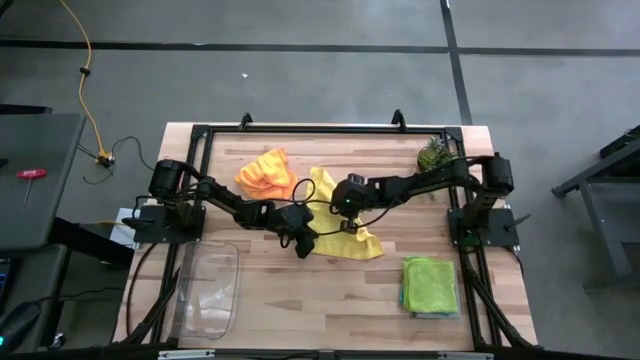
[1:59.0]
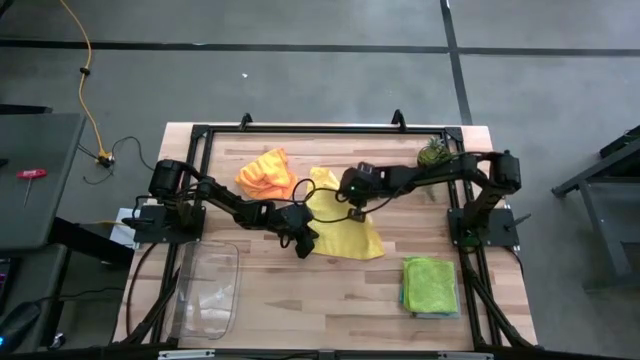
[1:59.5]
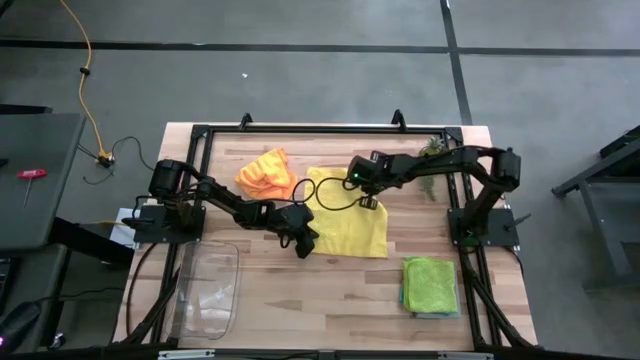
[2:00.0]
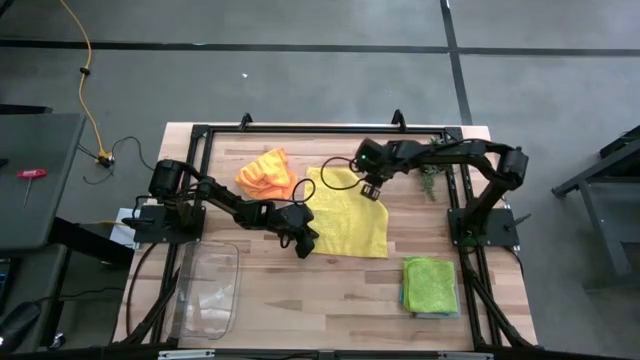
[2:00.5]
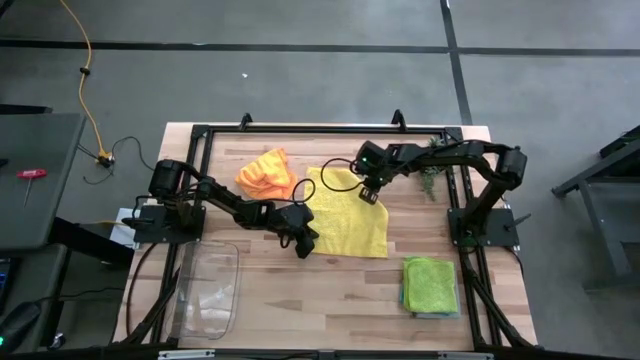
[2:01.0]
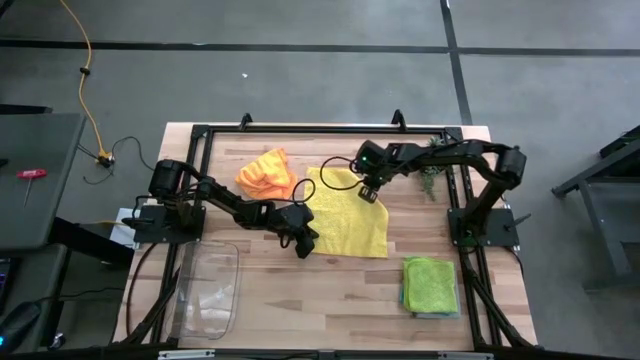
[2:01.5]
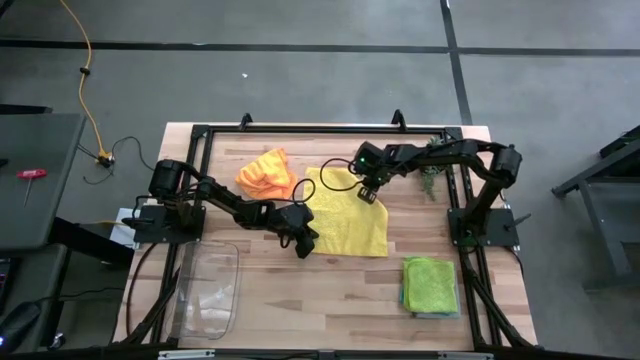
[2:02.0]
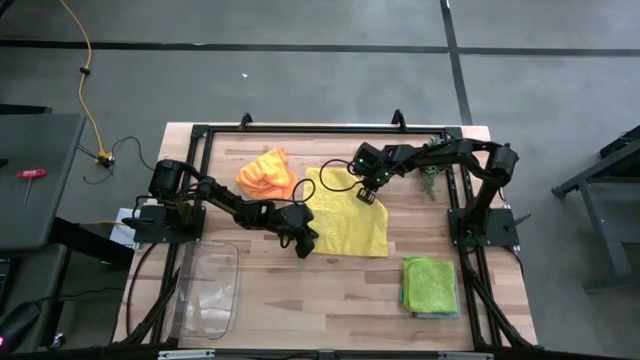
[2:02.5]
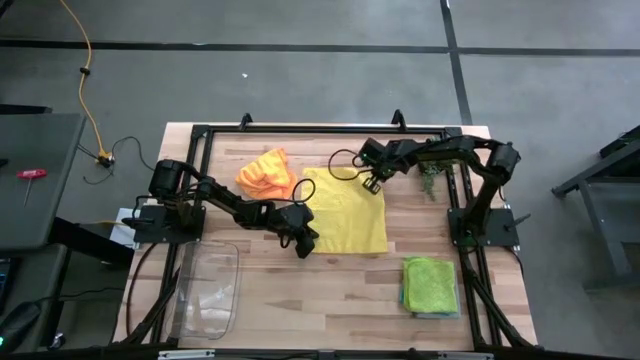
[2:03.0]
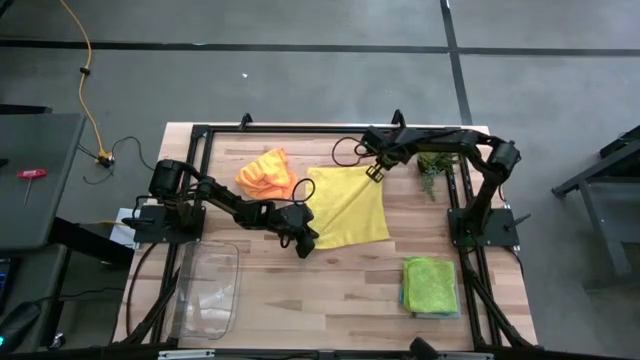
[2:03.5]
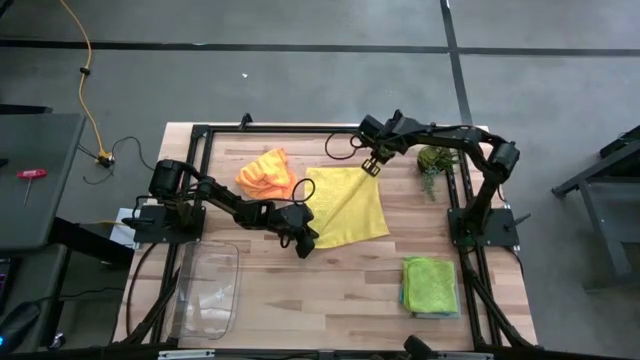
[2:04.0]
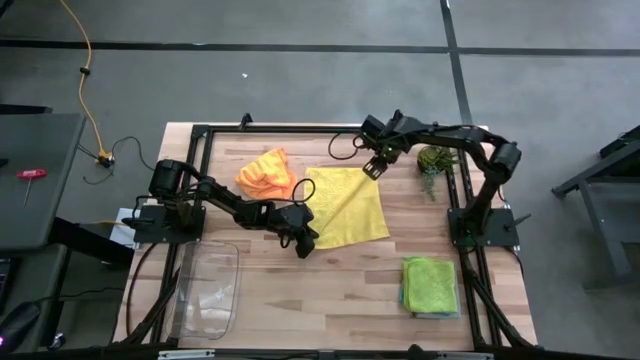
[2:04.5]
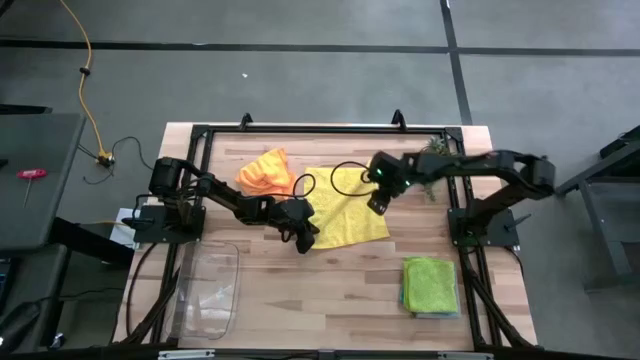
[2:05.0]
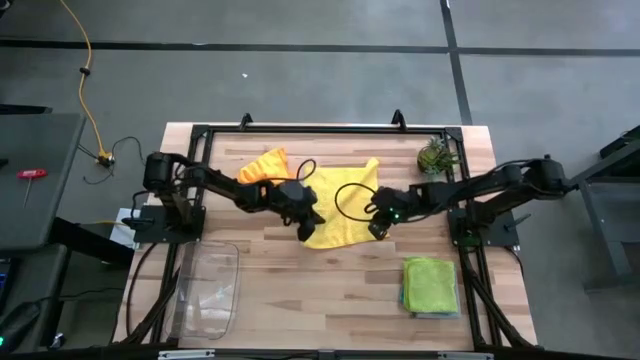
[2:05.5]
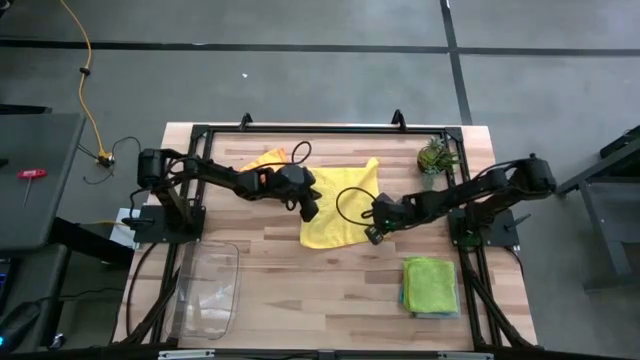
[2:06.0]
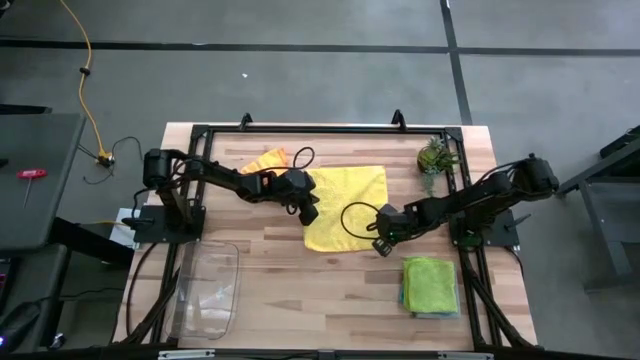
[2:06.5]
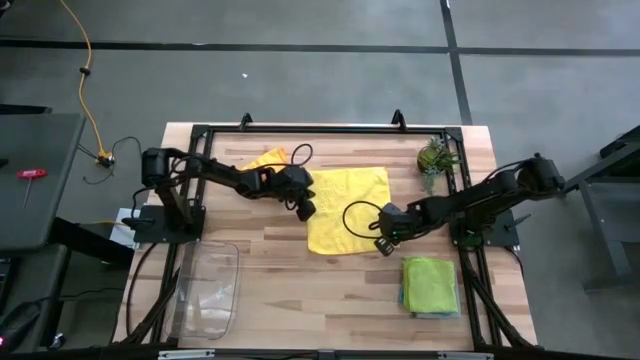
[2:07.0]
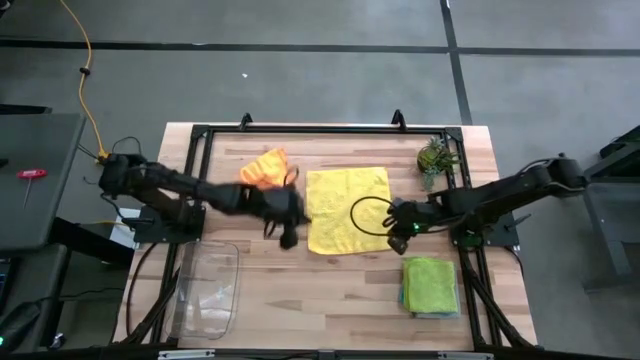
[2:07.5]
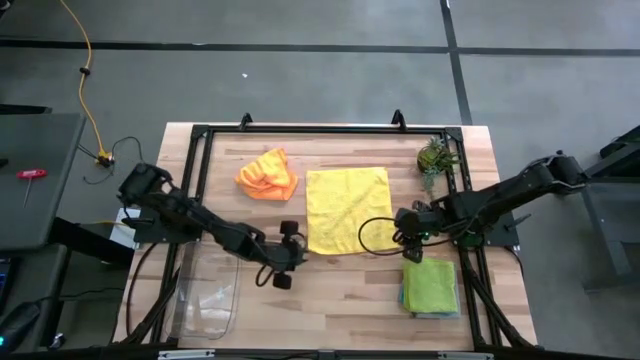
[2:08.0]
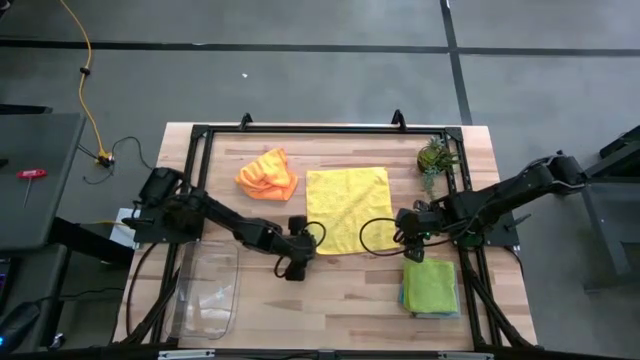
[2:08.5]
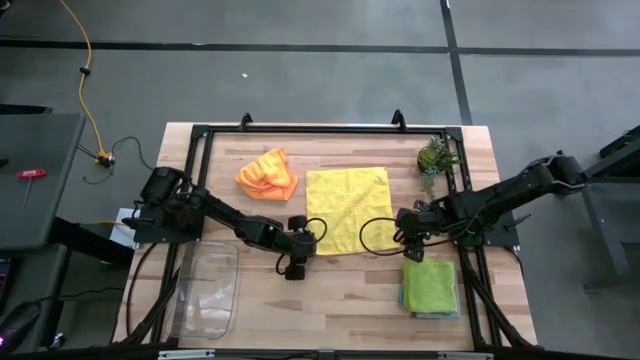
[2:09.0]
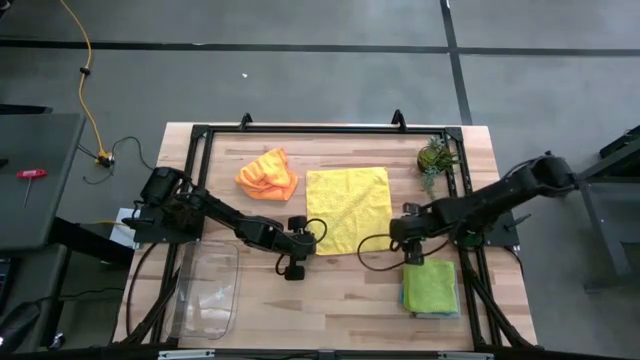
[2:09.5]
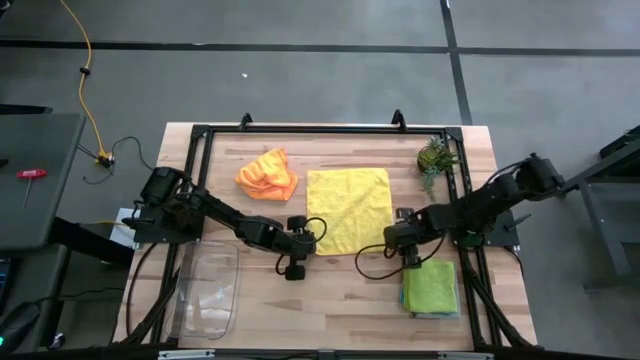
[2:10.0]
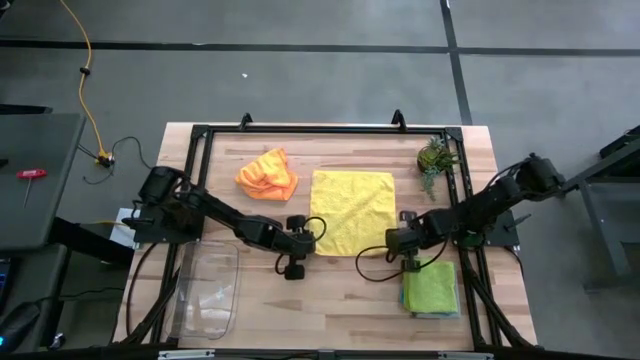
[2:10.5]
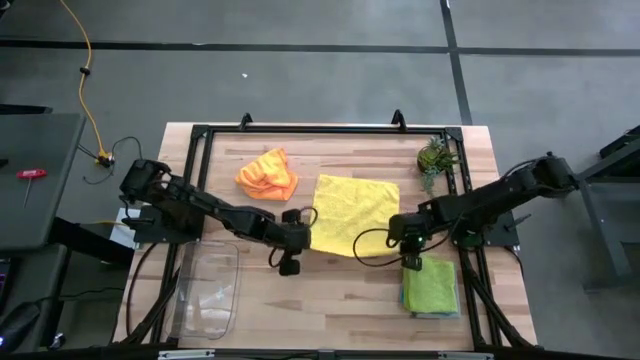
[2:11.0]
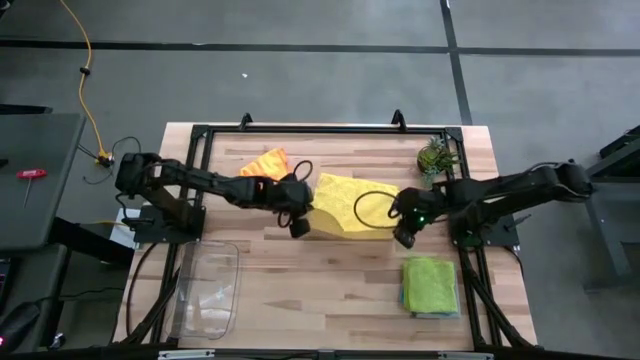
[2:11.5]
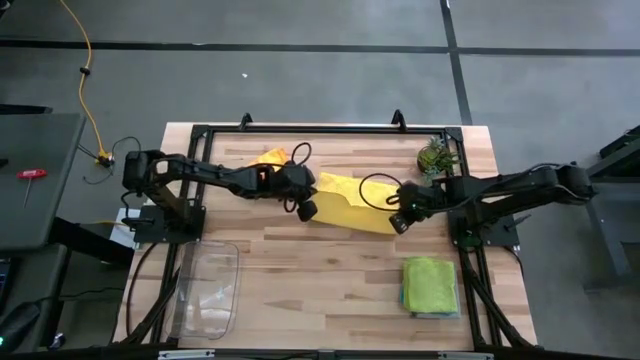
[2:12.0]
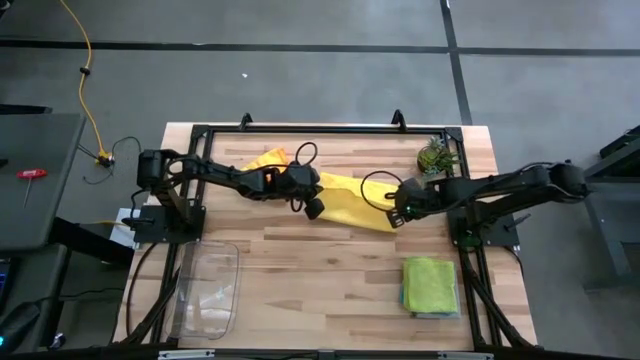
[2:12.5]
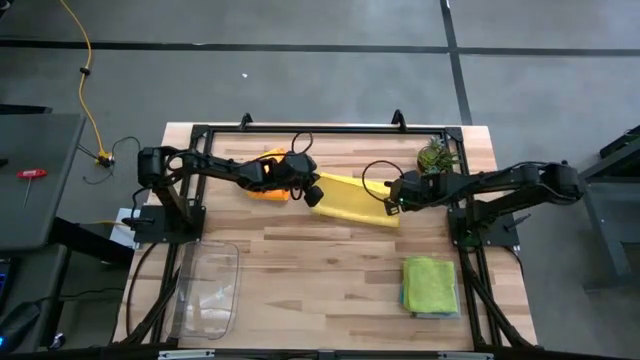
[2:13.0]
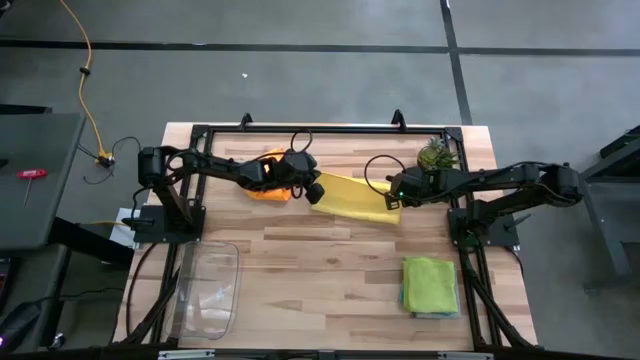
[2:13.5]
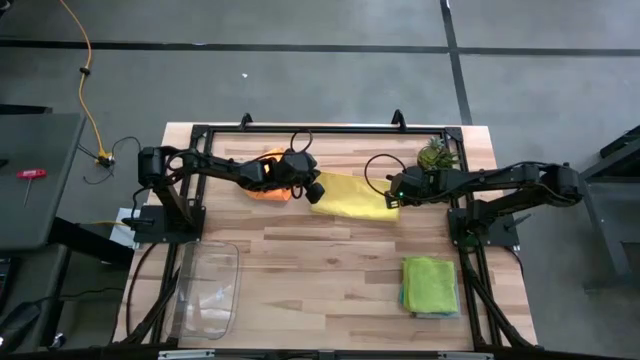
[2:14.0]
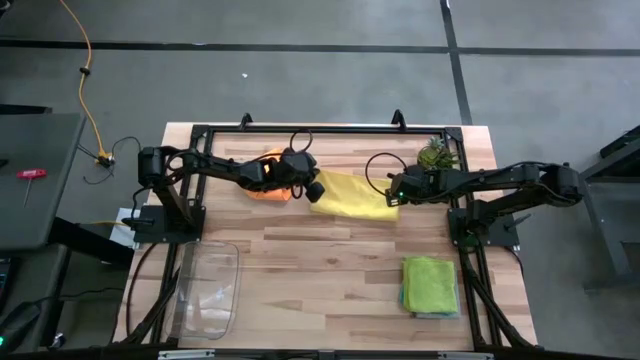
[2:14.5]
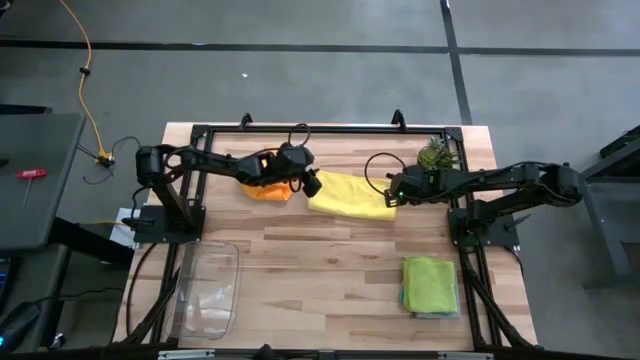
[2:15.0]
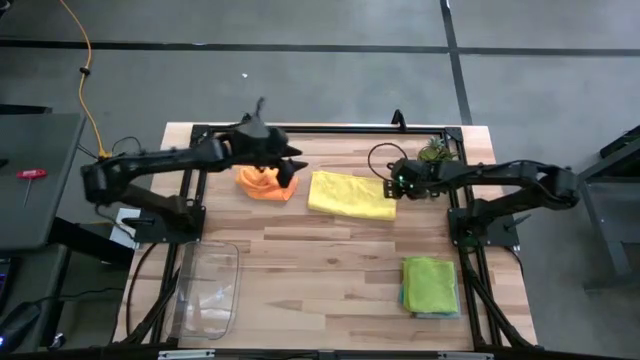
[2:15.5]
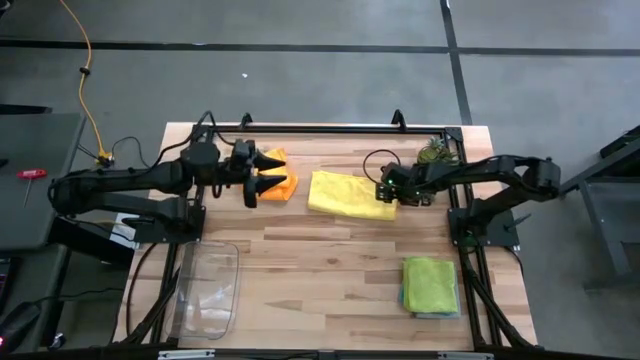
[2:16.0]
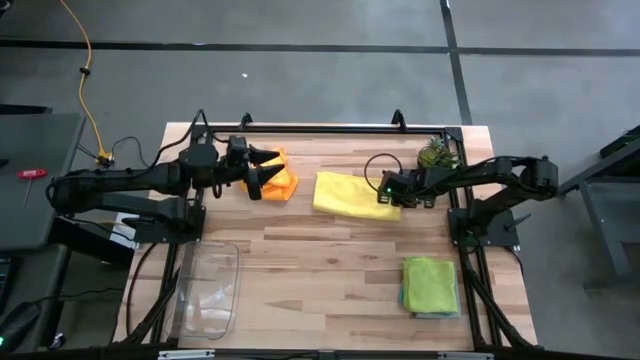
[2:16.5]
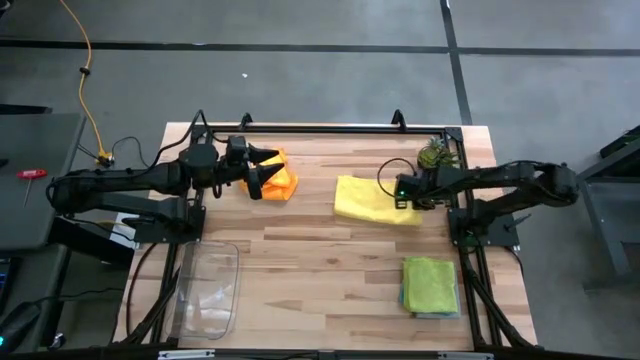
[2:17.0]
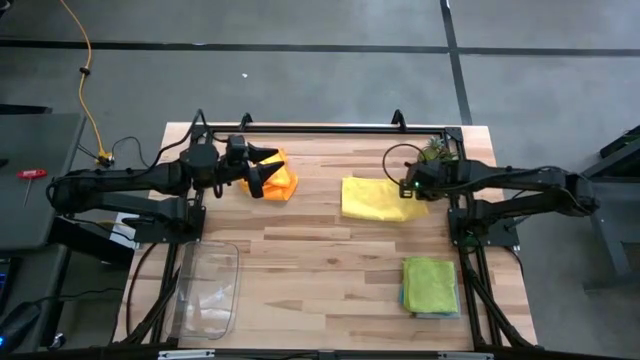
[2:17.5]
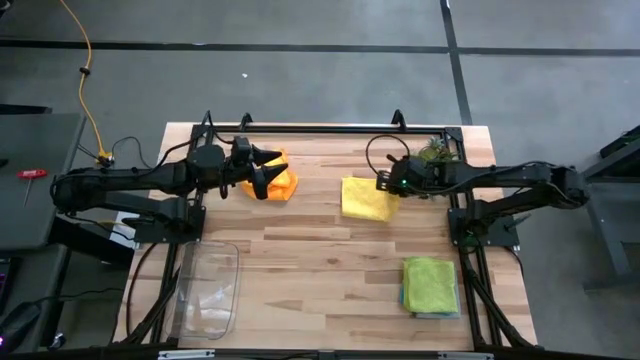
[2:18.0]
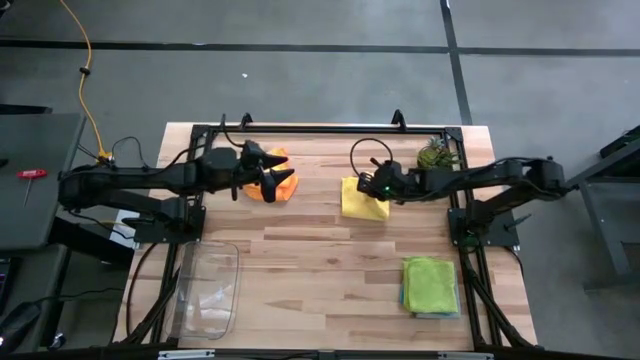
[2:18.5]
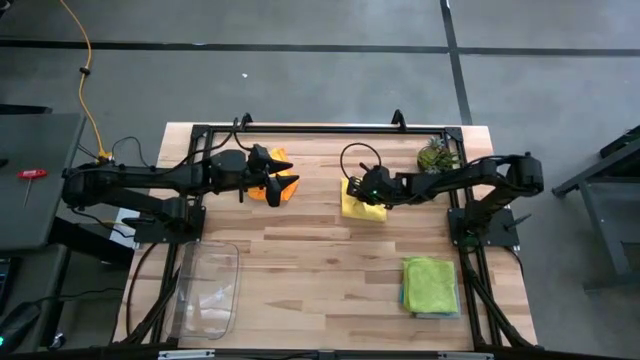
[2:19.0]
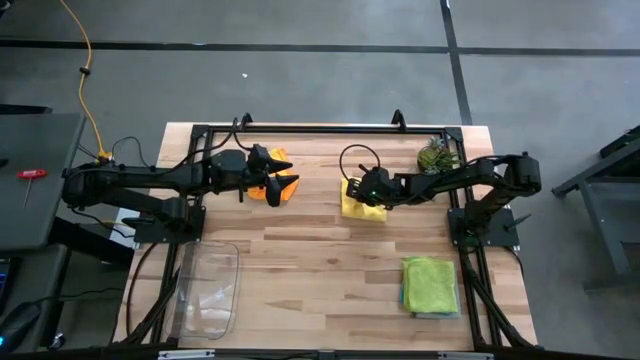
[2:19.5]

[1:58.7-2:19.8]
Task: Fold microfiber towels
Fold the yellow microfiber cloth

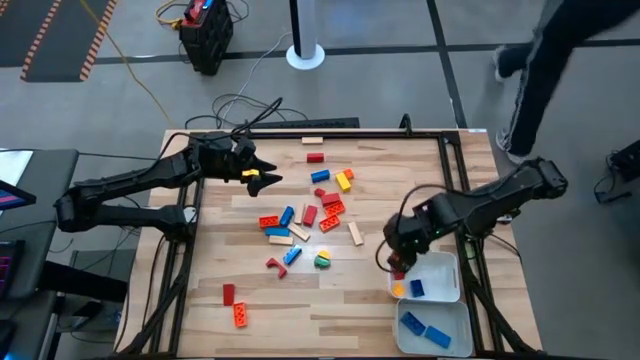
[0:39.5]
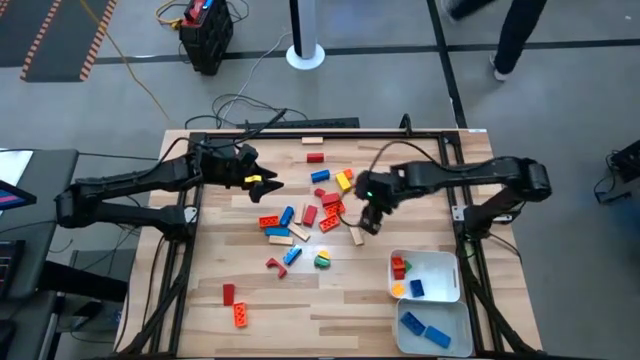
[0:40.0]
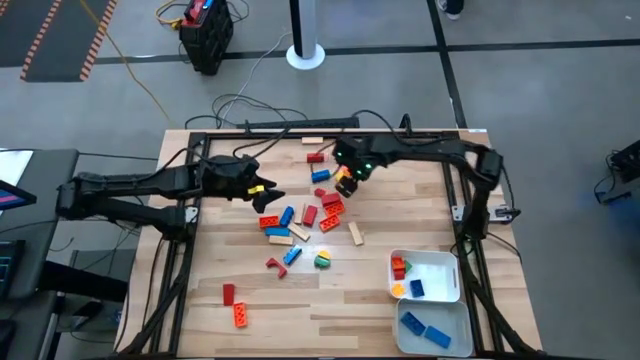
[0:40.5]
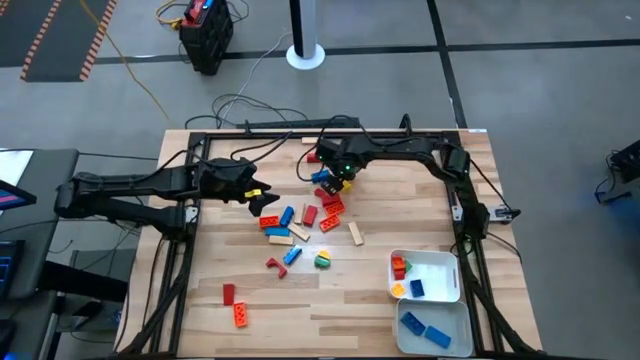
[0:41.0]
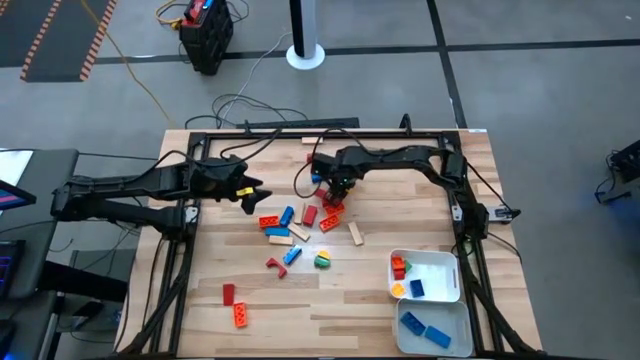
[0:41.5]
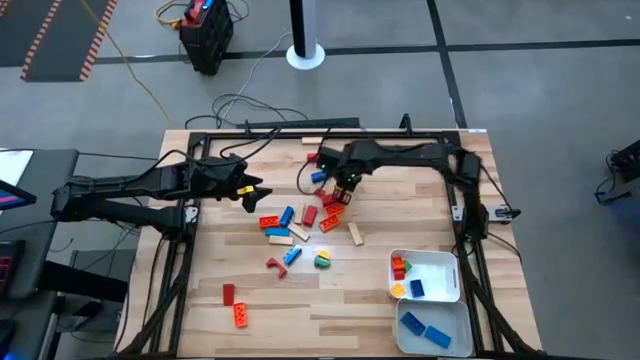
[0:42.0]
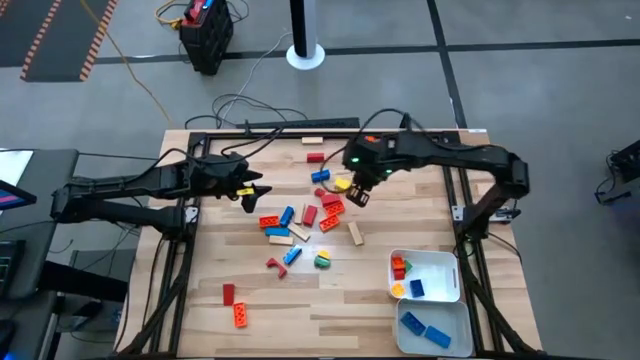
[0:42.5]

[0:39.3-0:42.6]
Task: Sort blocks by size
Put the big yellow block into the gray bin
